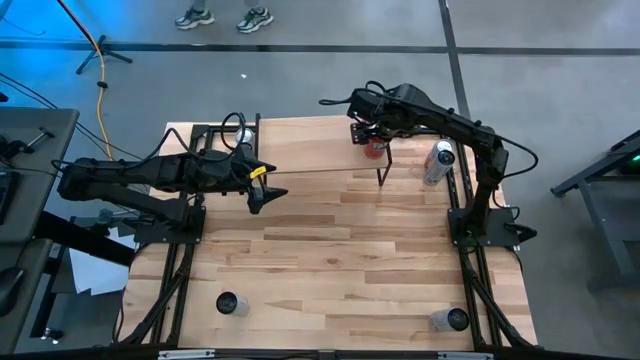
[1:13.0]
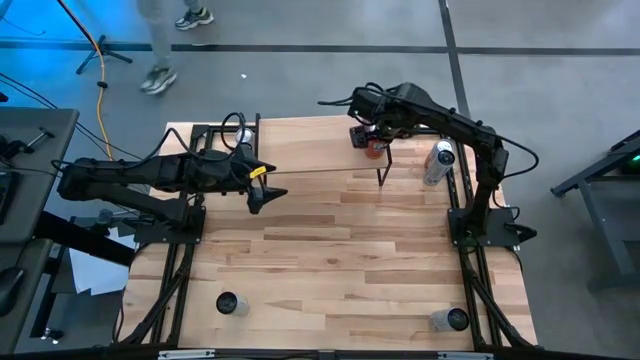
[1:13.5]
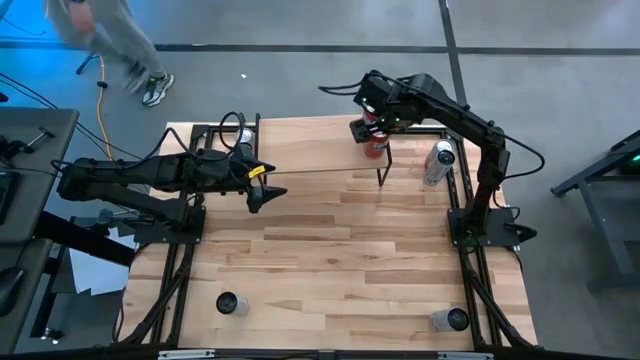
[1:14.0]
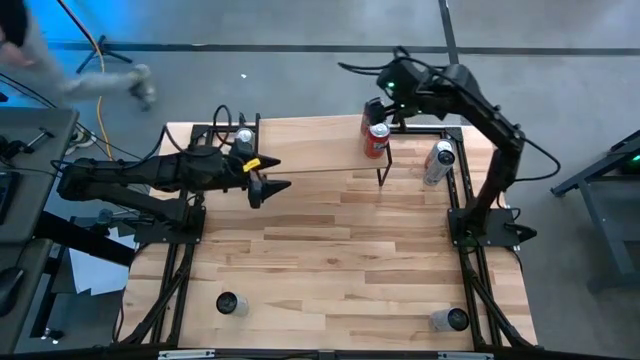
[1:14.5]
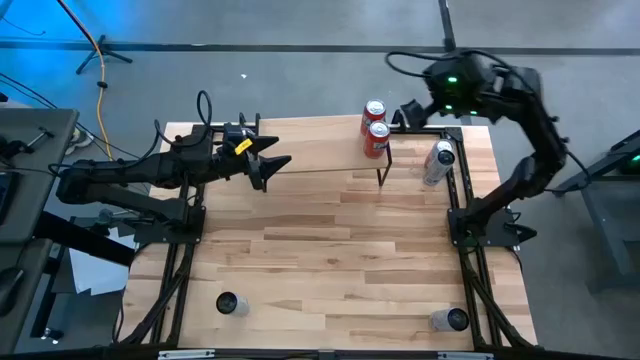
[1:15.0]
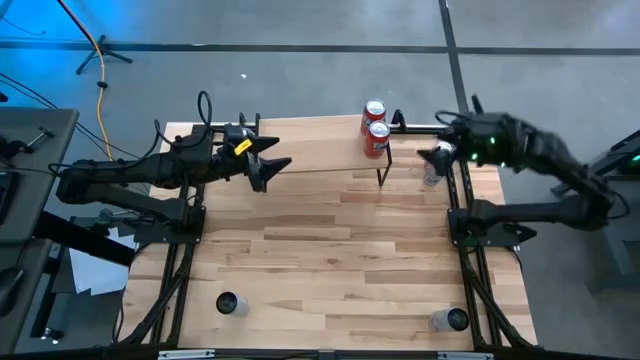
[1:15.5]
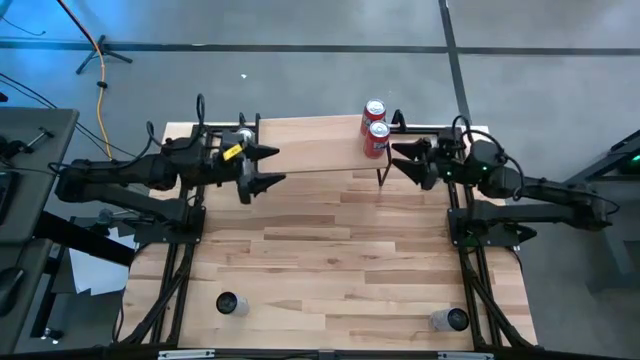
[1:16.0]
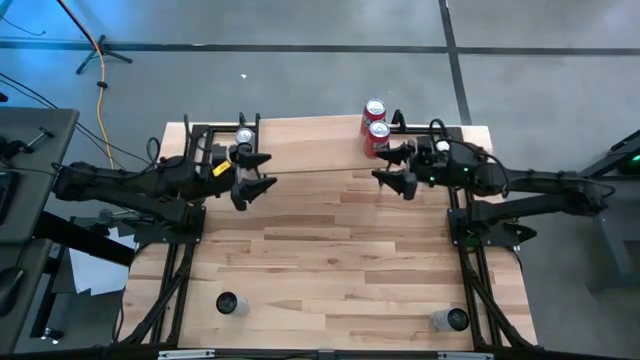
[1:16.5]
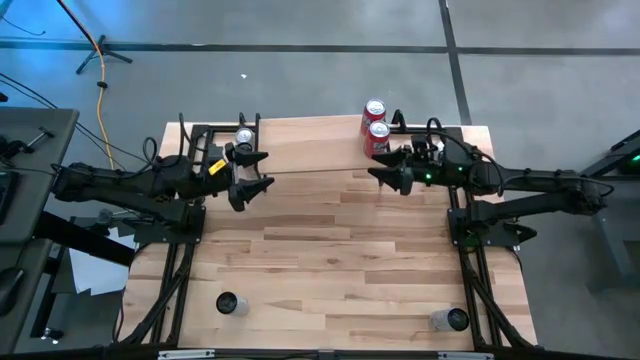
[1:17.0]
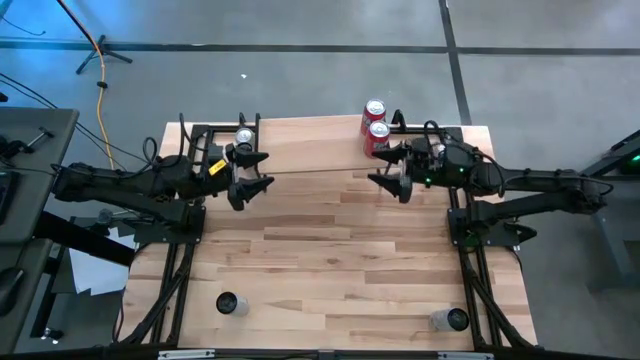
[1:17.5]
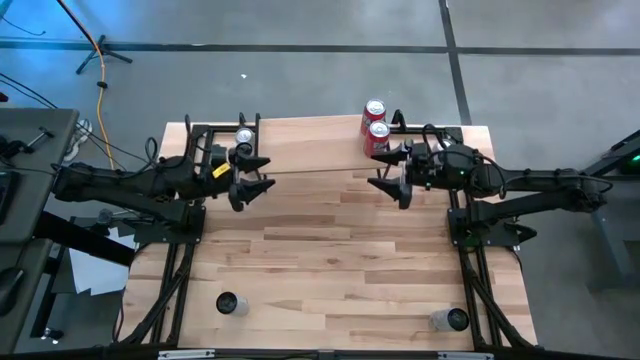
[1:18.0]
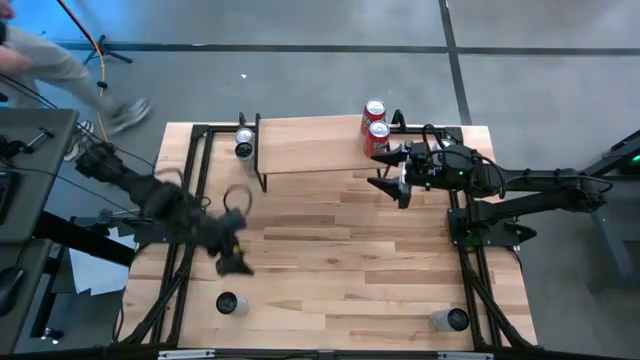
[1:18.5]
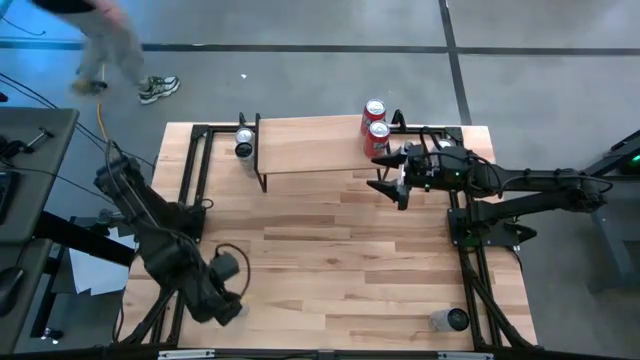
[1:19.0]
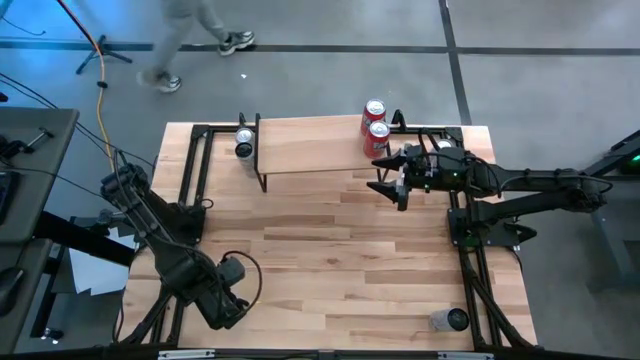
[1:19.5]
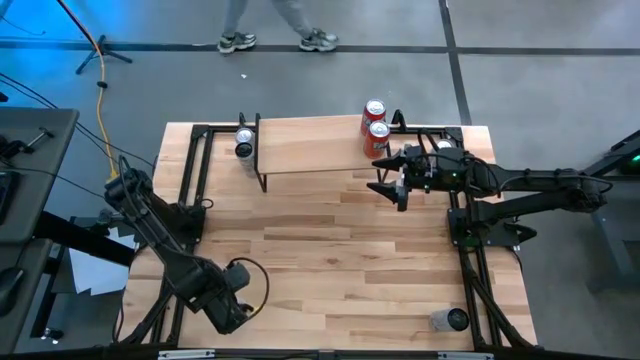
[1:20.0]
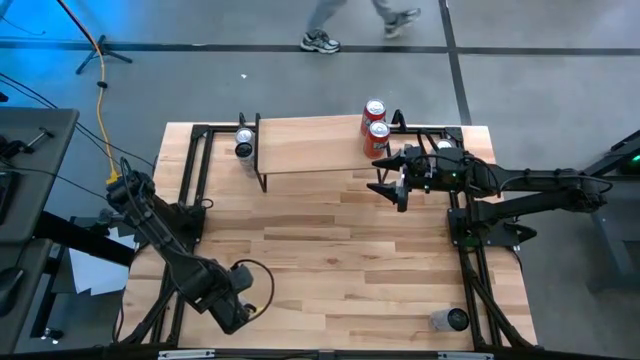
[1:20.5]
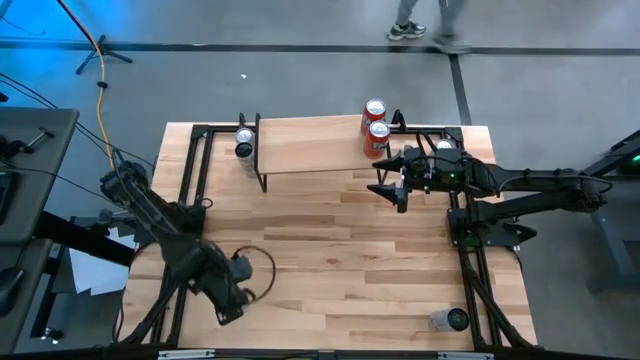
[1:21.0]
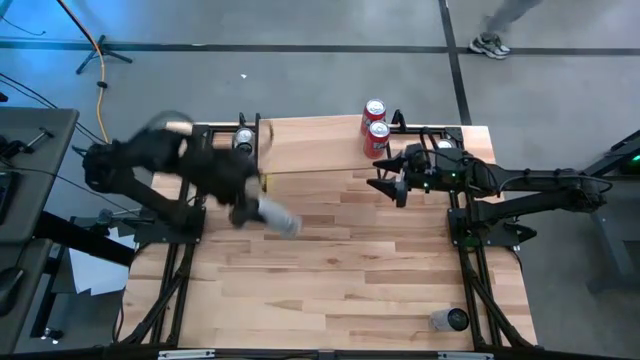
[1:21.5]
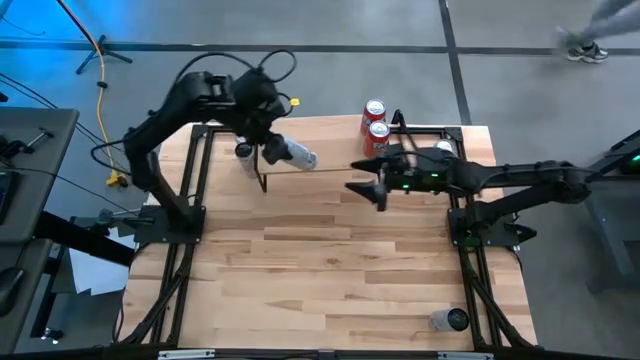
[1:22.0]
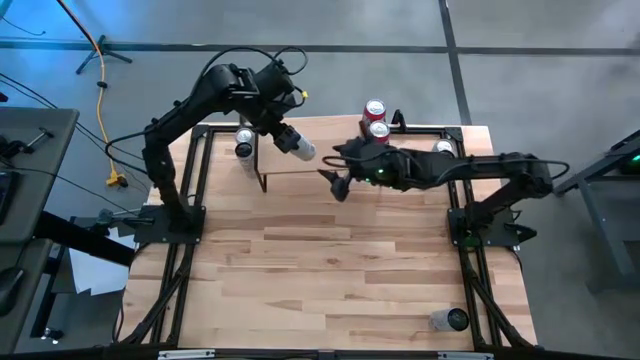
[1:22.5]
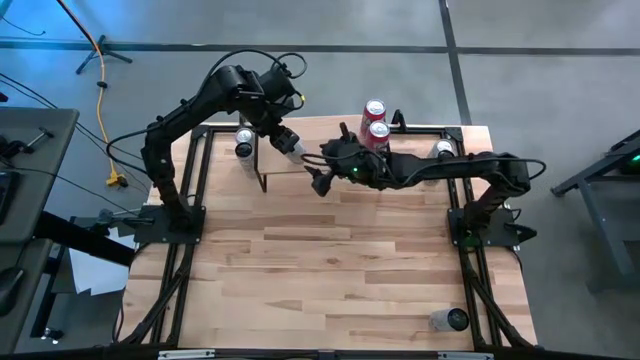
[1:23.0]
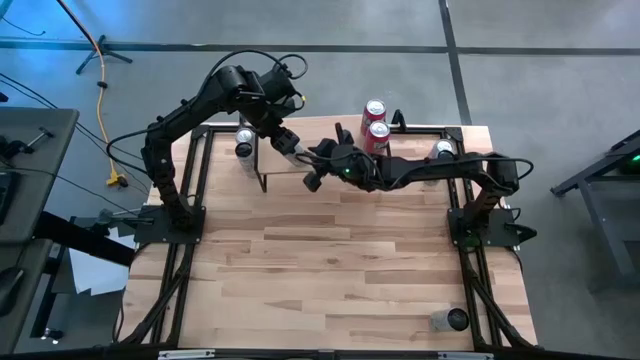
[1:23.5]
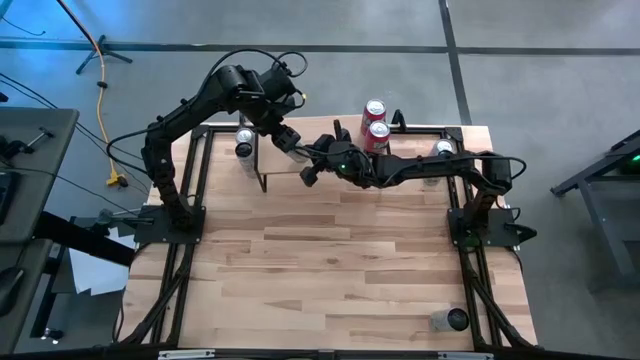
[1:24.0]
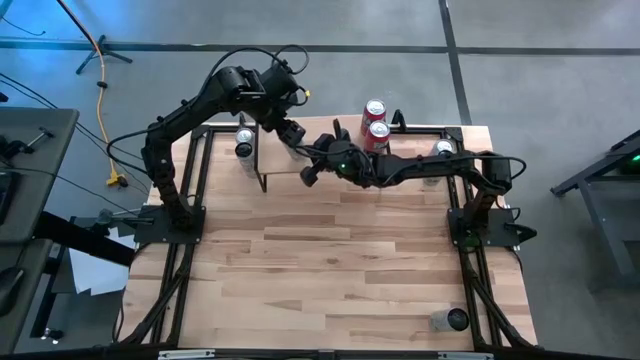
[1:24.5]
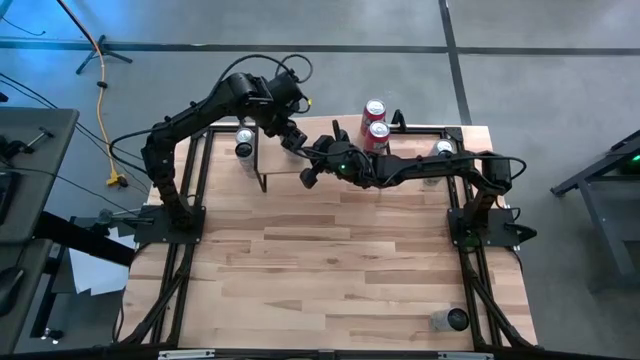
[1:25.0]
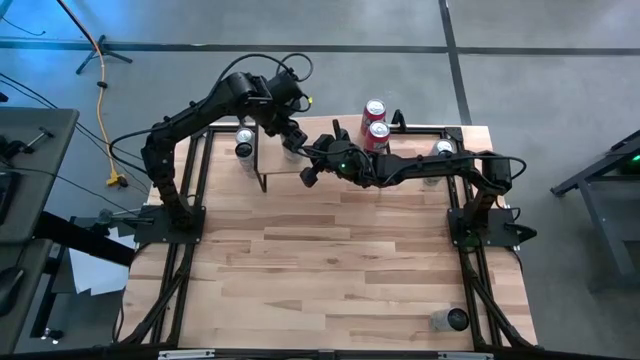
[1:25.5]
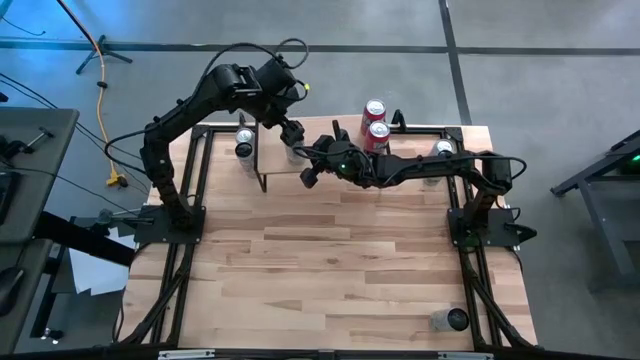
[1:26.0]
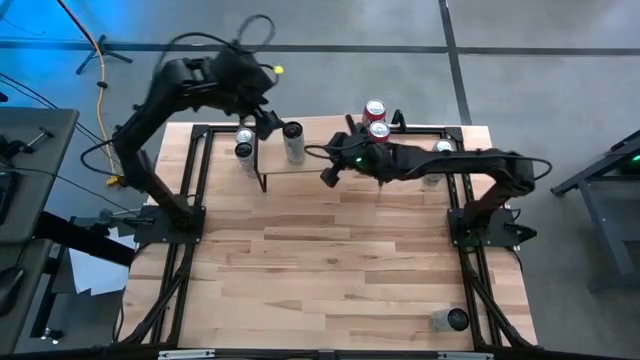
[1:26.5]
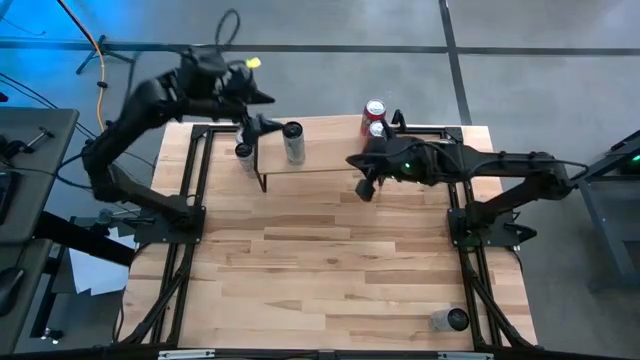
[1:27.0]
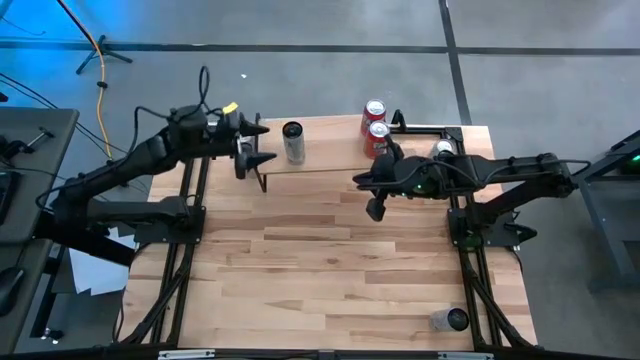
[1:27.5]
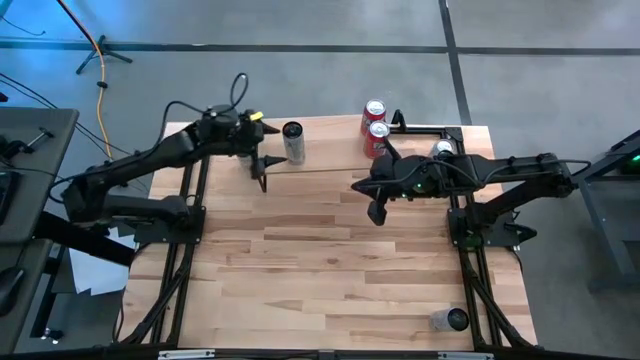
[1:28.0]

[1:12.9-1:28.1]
Task: Place canned beverage on shelf
Put the bottom black orange soda can on the shelf

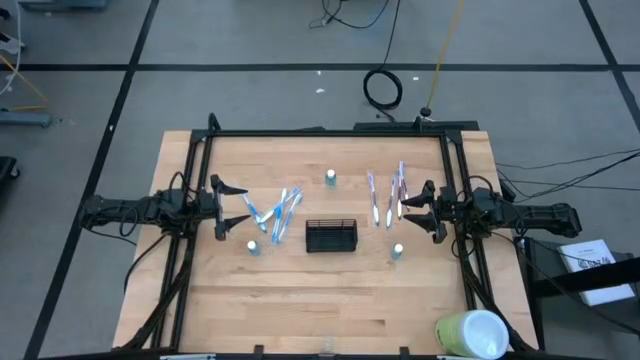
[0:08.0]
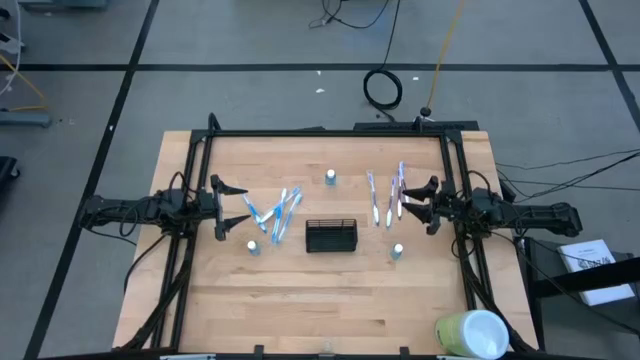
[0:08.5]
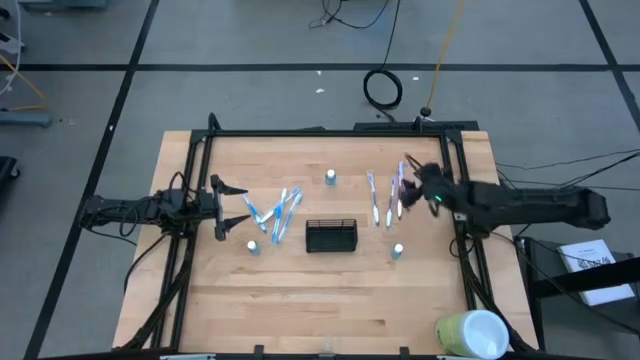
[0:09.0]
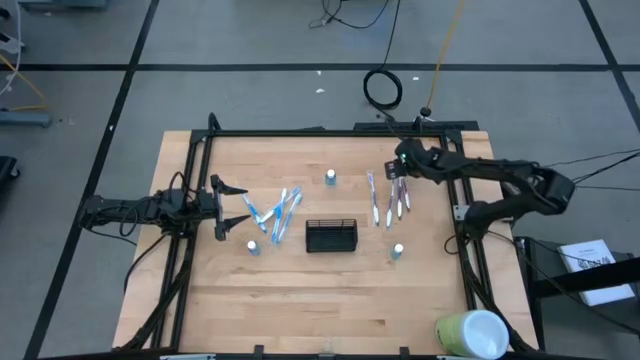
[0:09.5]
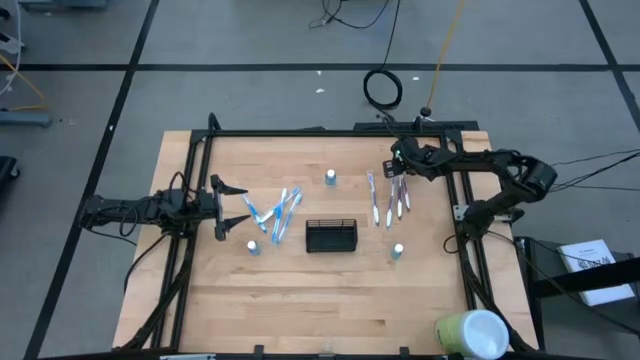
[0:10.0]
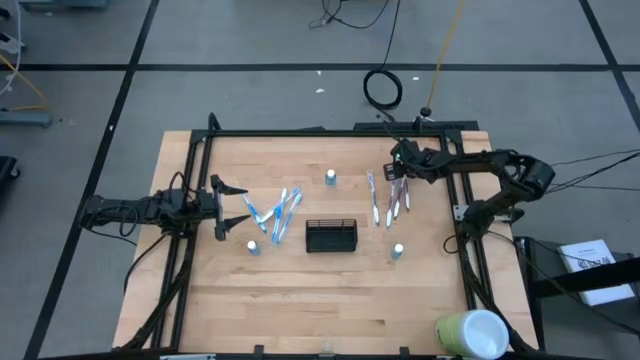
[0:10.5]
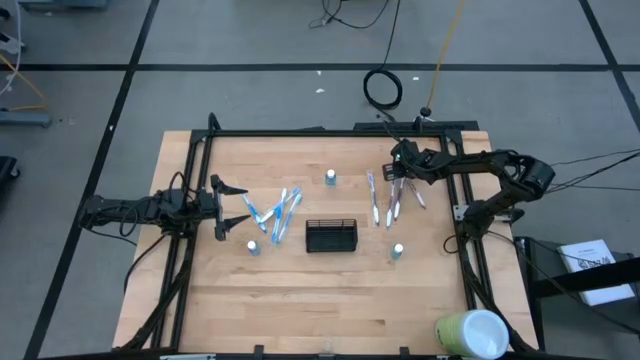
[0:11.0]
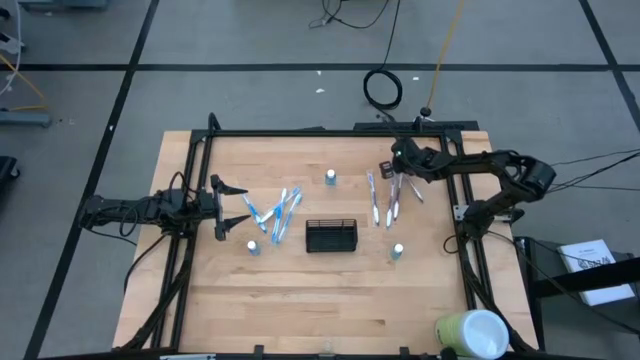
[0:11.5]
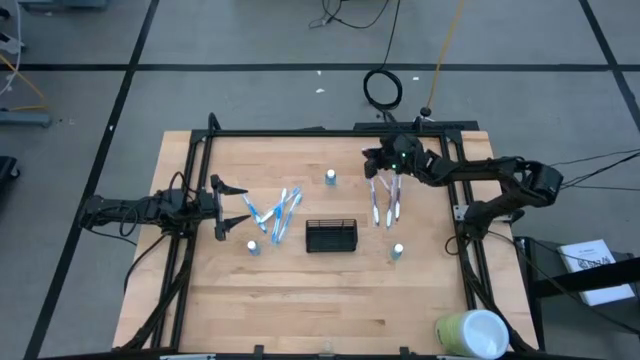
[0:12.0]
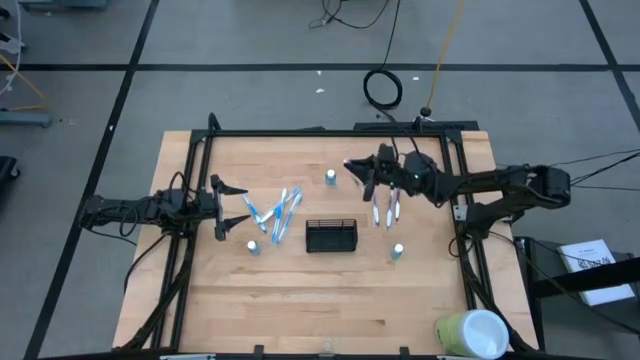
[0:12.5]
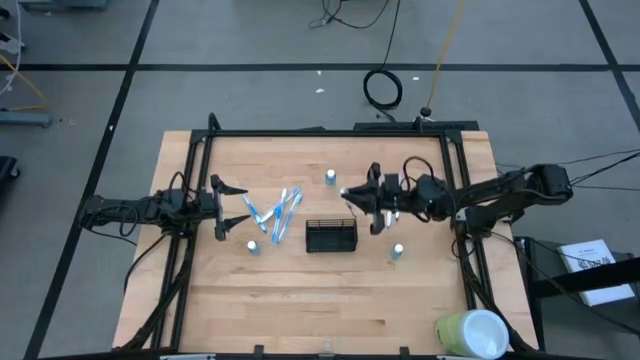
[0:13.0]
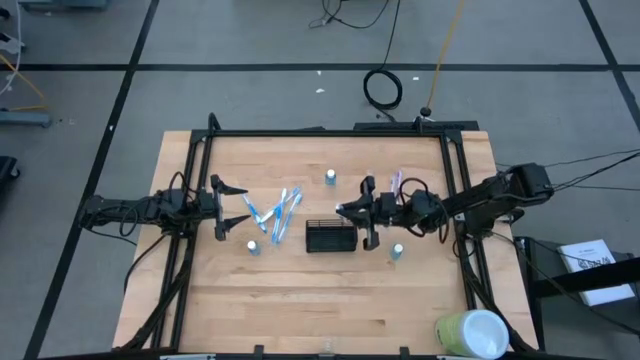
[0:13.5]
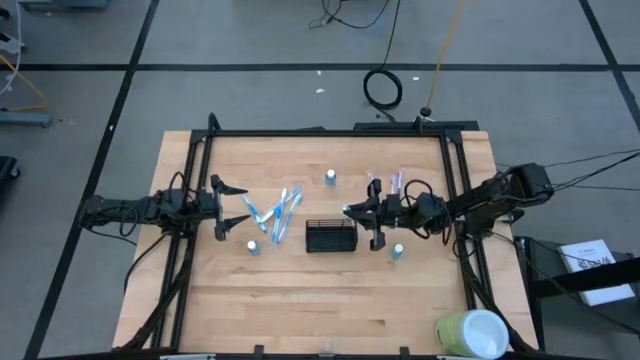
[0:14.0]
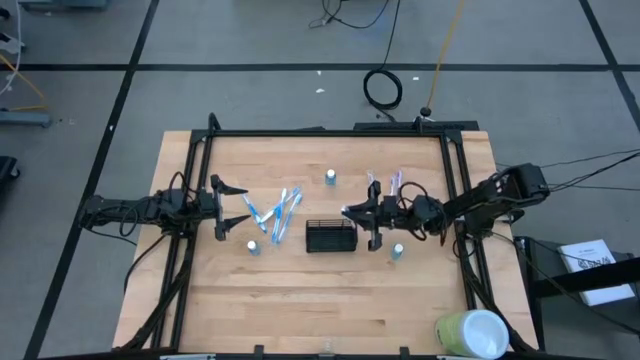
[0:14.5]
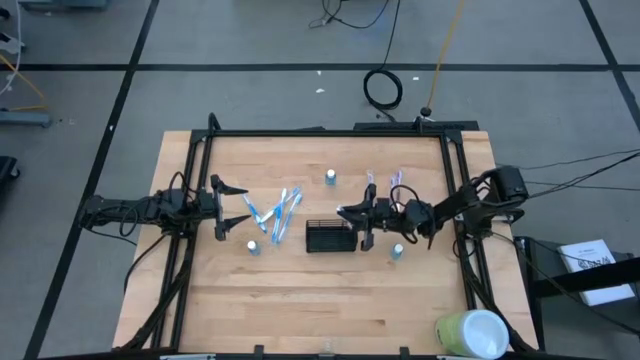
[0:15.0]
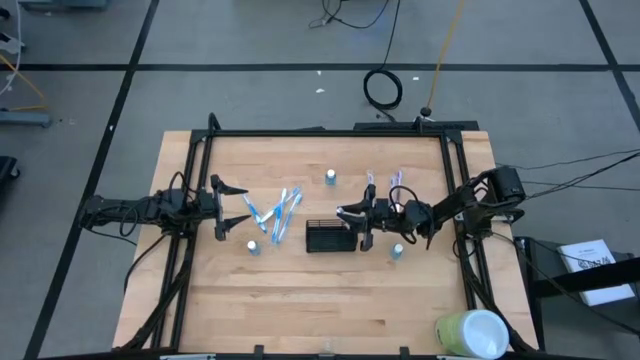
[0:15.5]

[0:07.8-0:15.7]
Task: Pick & Place toothbrushing station
Put the purple toothbrush into the right section of the wire organizer
